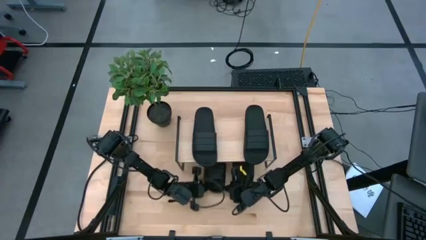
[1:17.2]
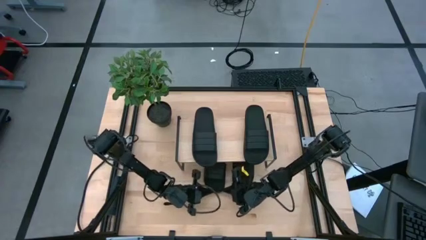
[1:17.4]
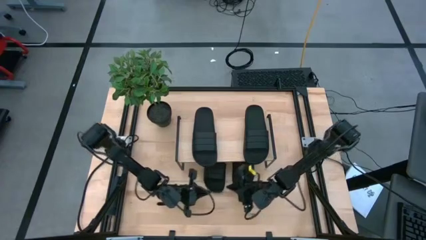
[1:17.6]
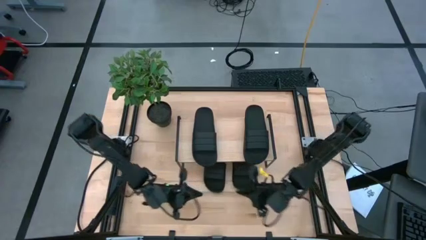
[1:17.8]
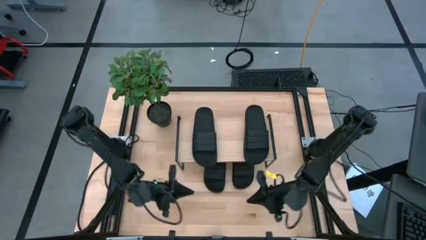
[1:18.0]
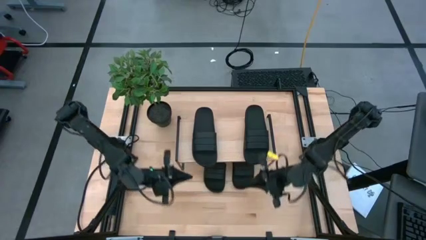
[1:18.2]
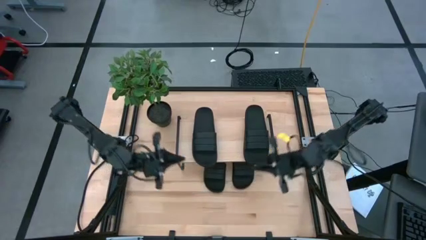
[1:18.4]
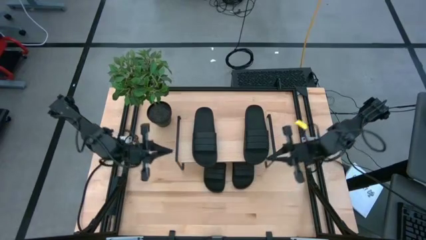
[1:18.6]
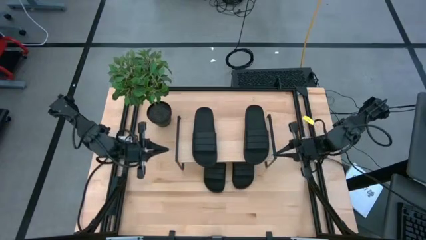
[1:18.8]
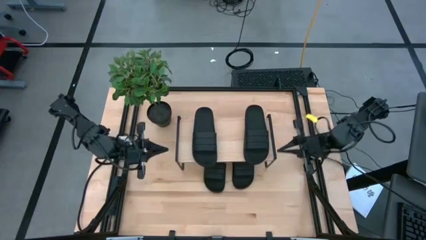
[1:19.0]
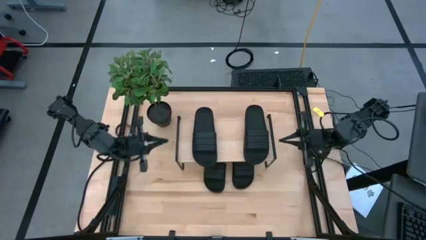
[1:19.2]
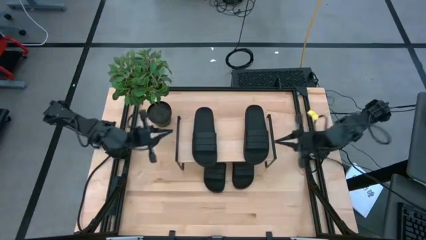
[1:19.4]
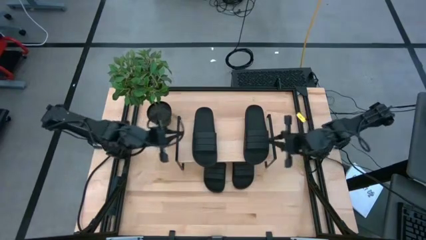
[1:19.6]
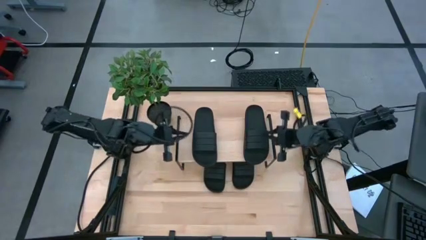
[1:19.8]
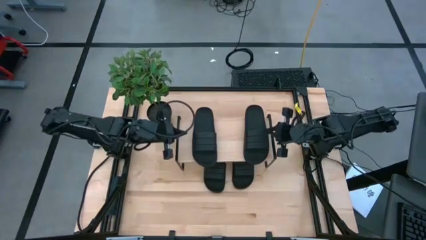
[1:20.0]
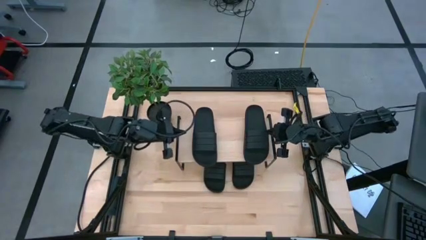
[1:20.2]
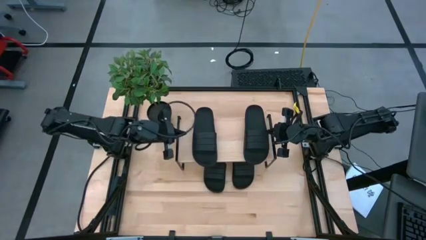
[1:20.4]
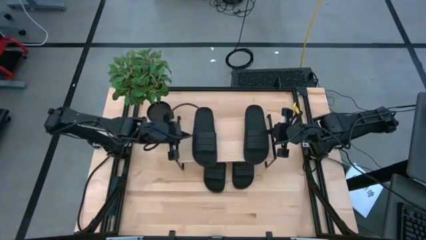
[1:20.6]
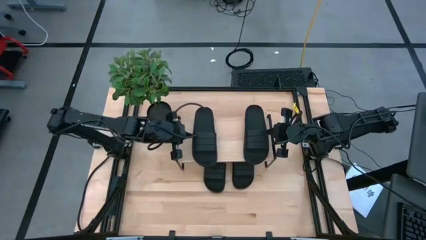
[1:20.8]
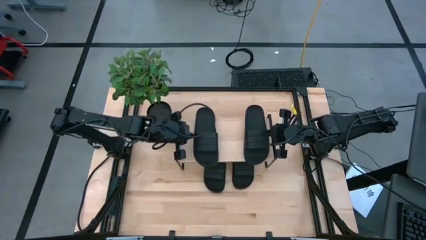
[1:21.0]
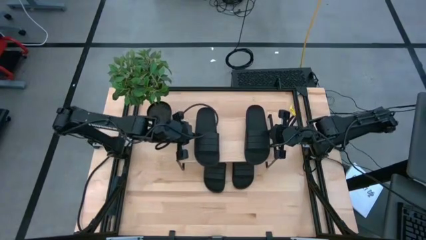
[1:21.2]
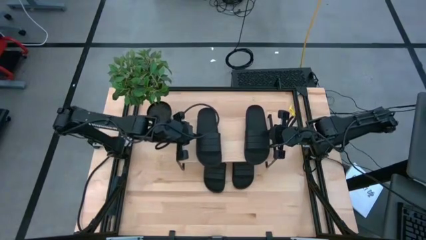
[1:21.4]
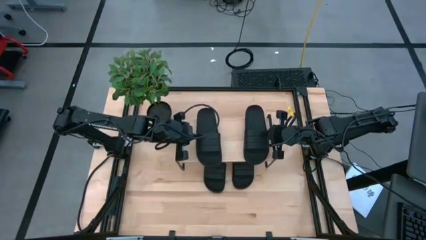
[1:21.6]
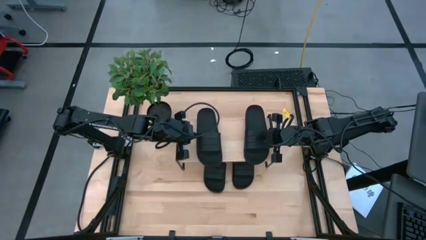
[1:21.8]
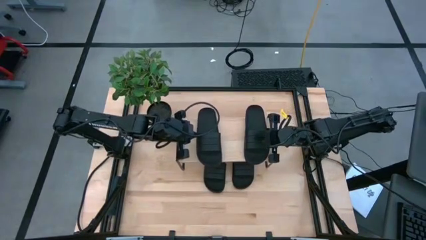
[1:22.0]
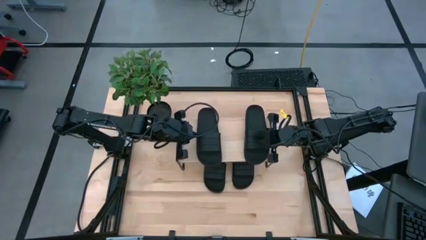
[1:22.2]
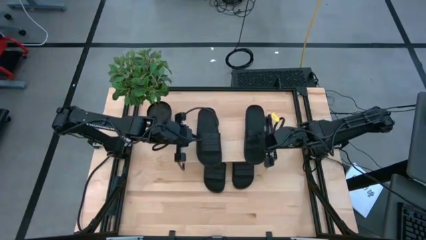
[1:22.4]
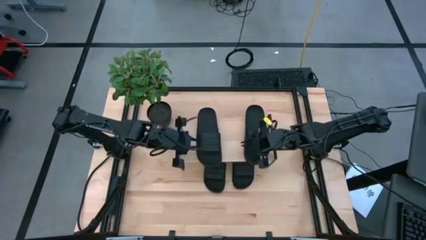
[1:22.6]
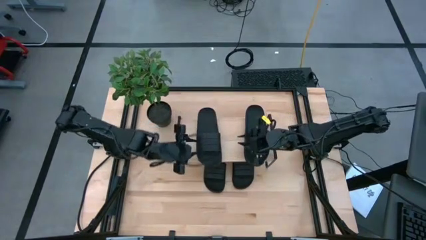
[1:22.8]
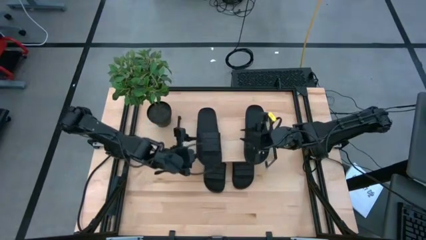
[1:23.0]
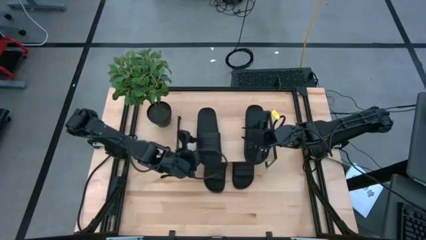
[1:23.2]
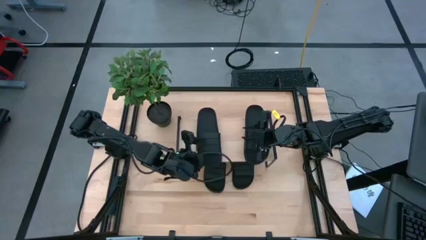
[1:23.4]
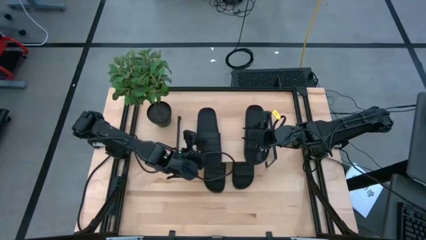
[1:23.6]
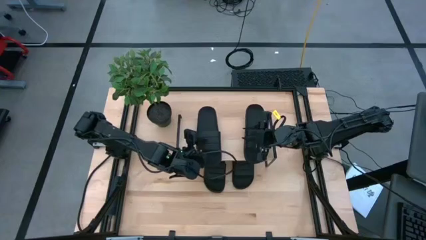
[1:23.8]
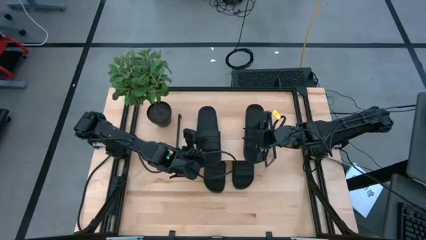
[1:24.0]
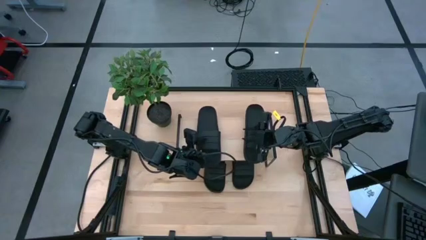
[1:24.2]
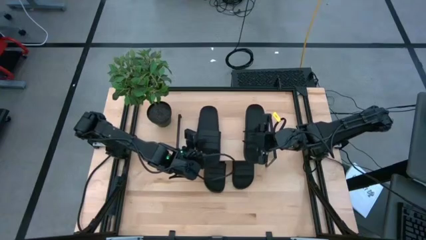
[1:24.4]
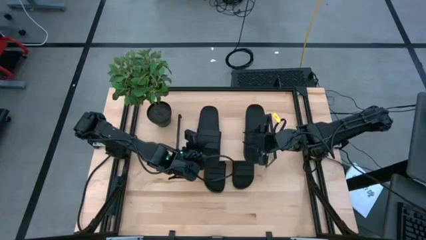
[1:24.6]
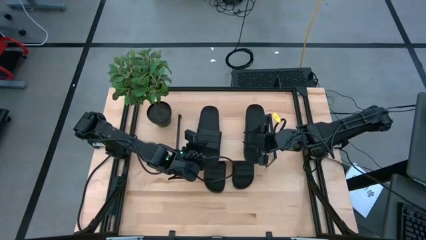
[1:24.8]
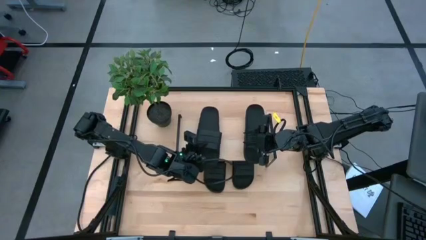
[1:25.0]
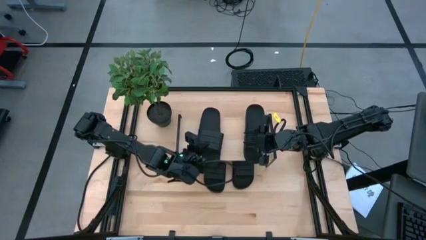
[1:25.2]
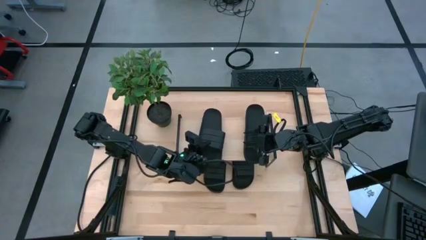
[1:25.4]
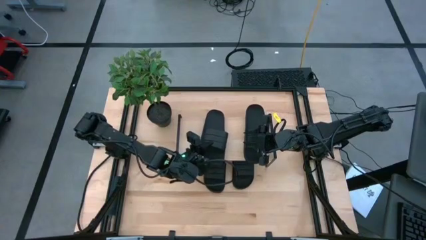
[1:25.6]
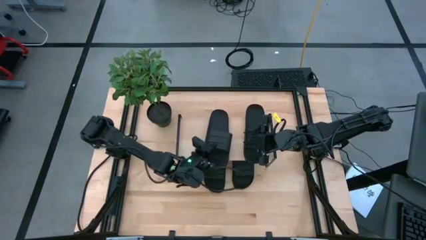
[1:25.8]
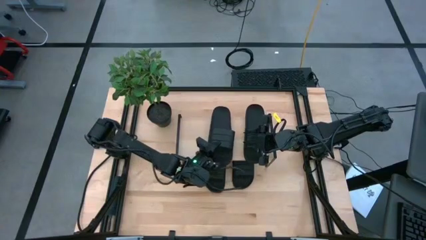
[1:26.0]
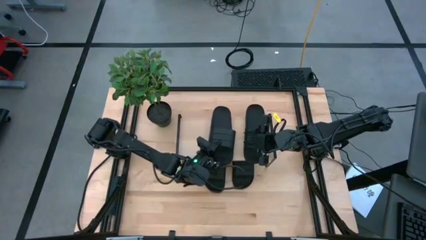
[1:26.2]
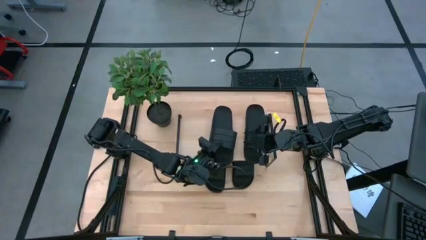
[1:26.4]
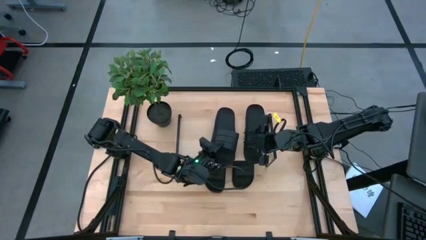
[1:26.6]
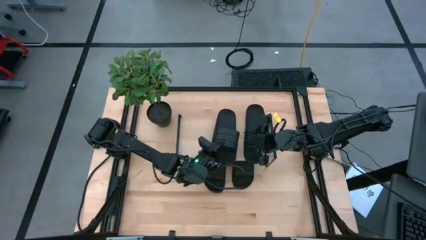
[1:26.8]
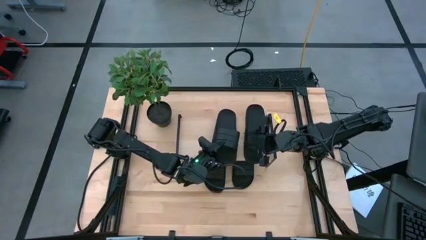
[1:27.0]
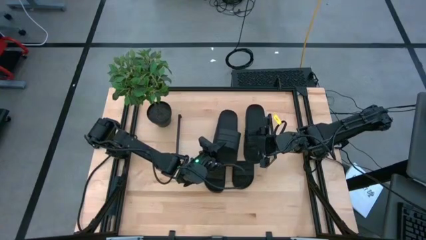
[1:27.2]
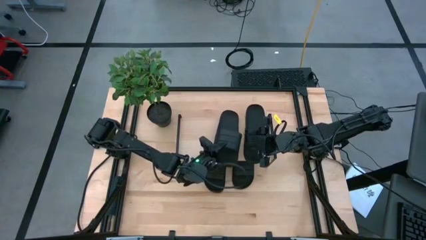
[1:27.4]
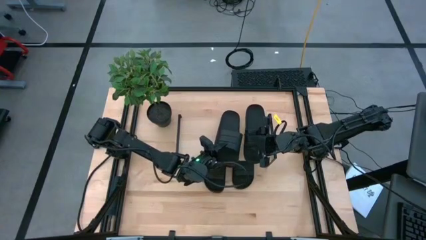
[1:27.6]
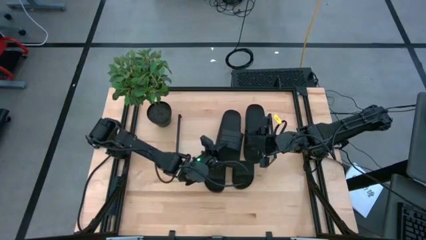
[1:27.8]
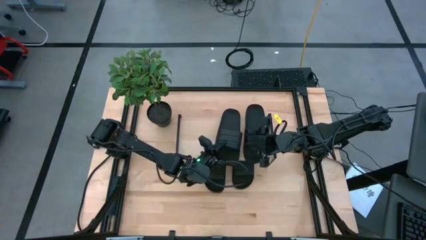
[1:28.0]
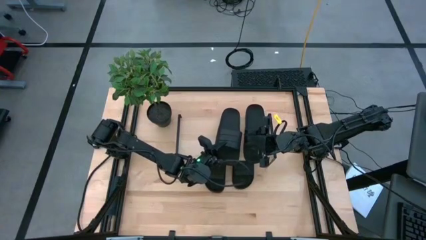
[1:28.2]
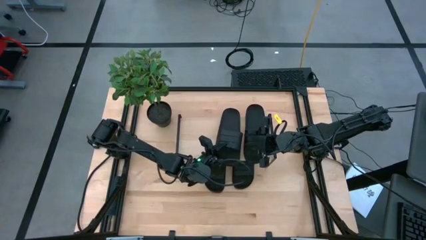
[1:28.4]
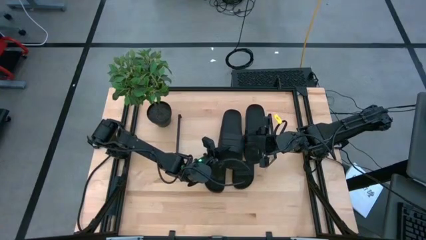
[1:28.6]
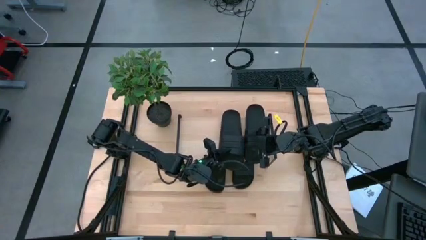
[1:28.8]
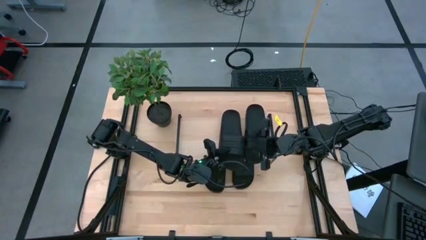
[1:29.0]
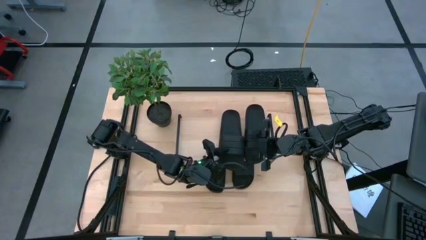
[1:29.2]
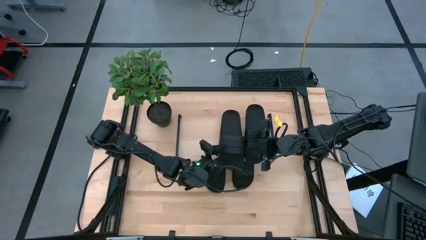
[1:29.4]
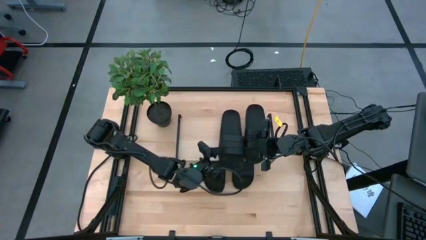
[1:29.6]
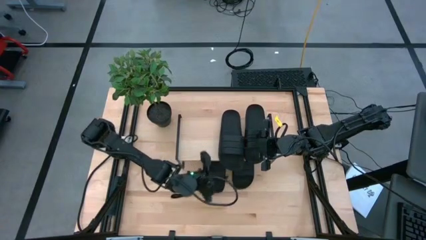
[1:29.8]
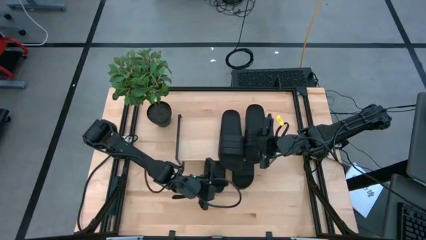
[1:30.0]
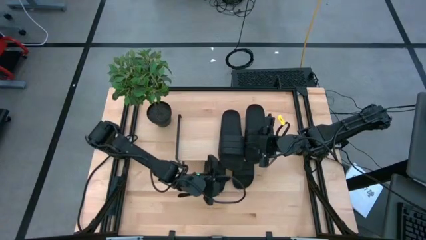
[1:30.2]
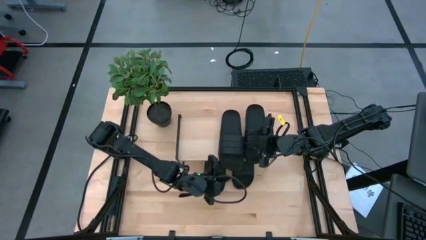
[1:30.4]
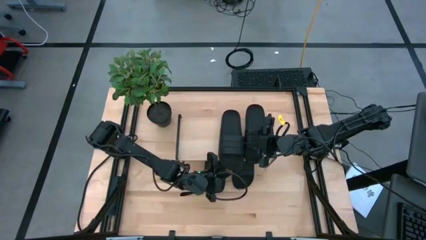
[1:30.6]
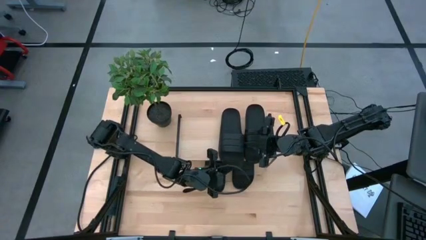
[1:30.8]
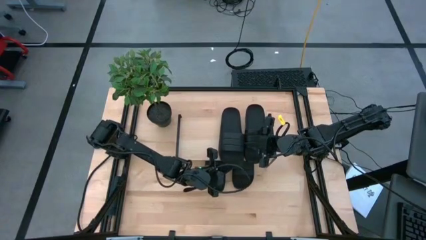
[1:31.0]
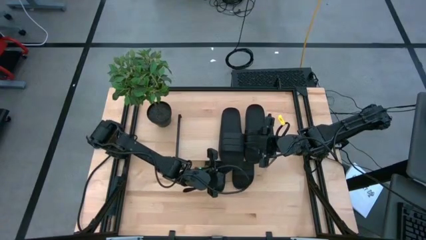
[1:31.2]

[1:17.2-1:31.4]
Task: Pick and place slides into the shelf
Adjust the slipper on the shelf

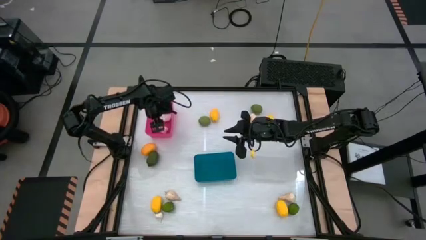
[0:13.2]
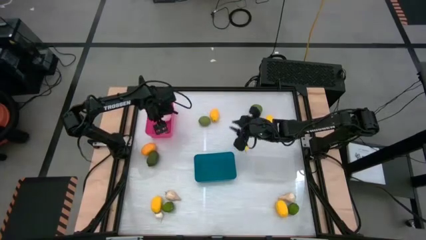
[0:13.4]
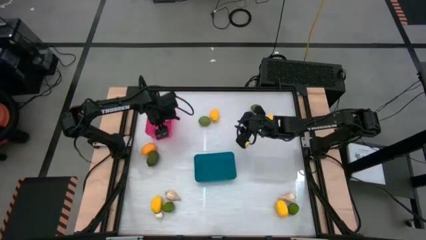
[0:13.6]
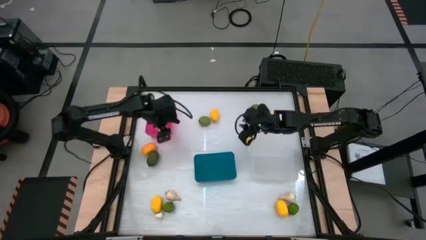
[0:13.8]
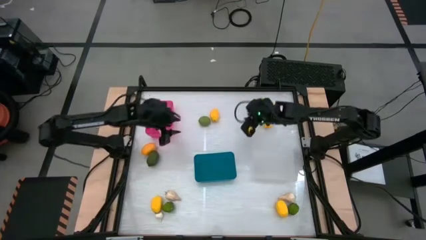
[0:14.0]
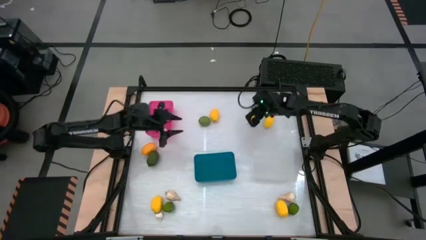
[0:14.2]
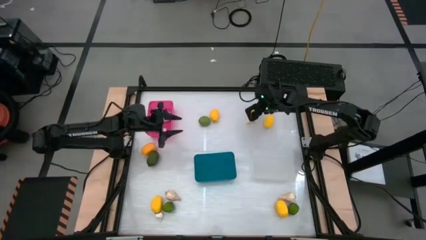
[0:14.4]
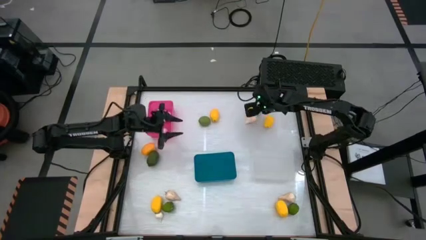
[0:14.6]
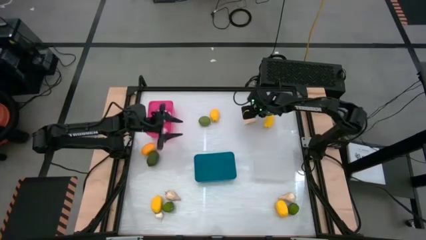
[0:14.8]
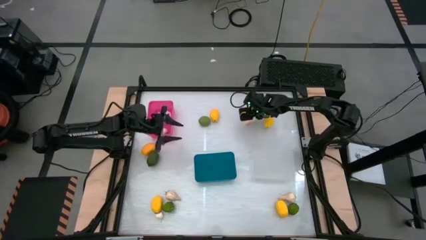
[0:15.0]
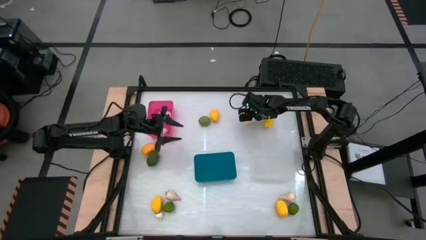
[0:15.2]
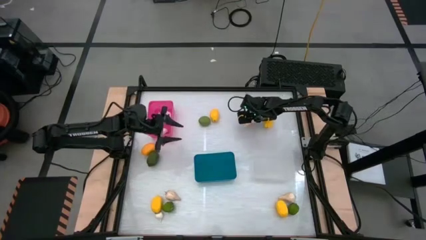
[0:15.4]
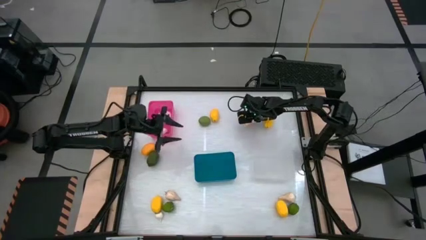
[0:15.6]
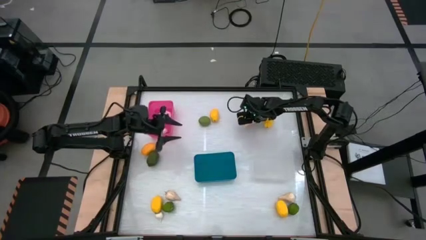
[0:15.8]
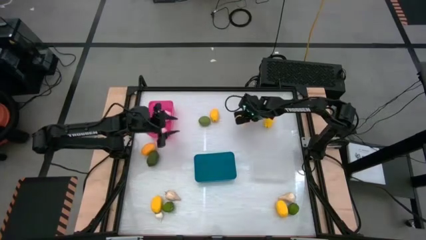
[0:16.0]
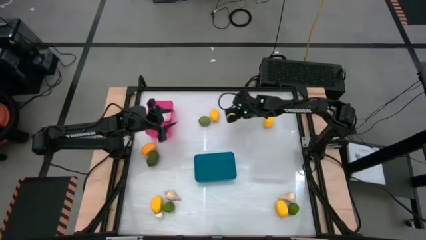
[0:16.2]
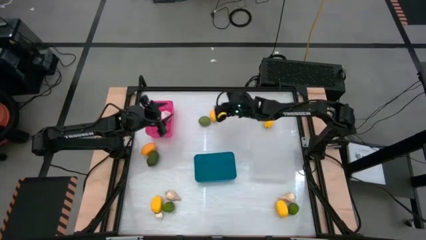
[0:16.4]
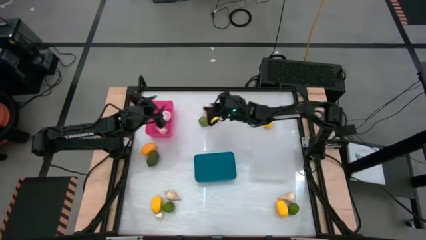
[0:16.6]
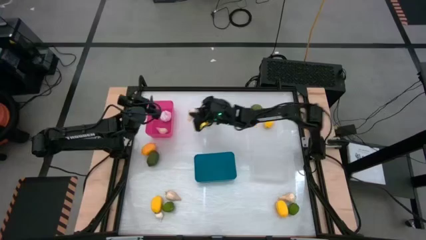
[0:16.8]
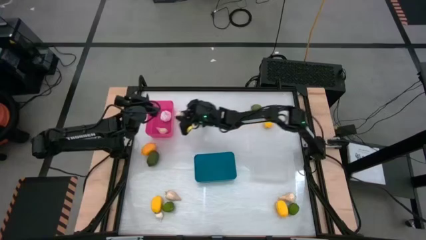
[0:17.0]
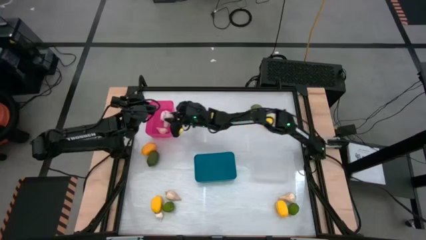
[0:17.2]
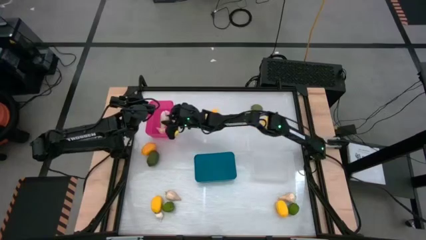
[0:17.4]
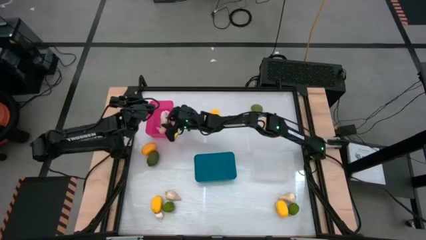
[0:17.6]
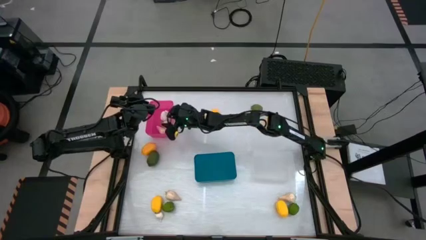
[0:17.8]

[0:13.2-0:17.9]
Task: Sort produce into baskets
Put the garlic into the pink bin
